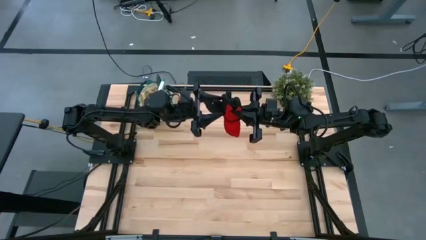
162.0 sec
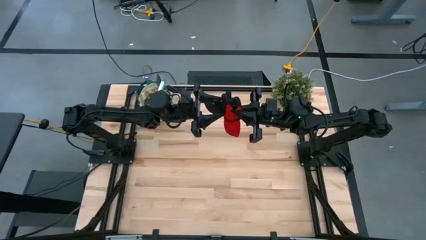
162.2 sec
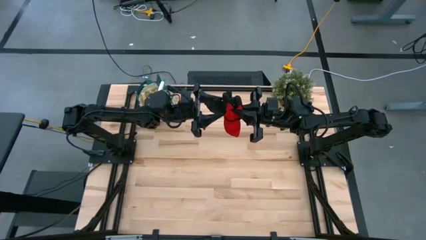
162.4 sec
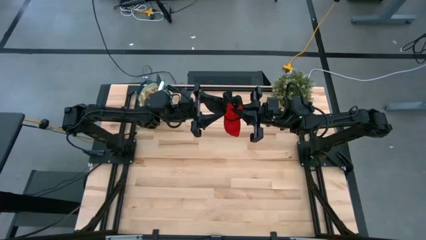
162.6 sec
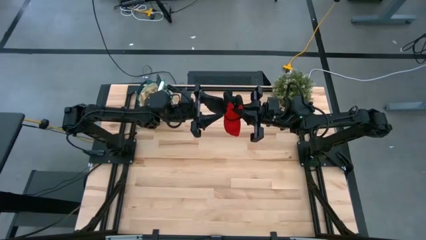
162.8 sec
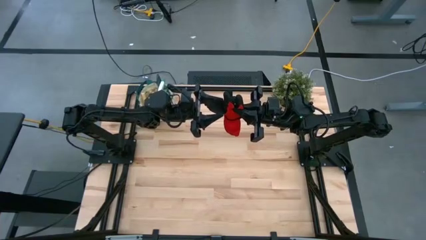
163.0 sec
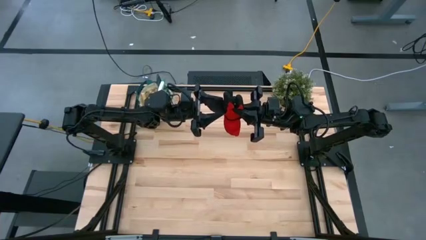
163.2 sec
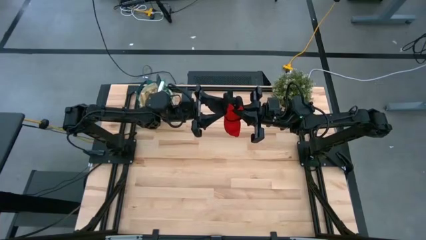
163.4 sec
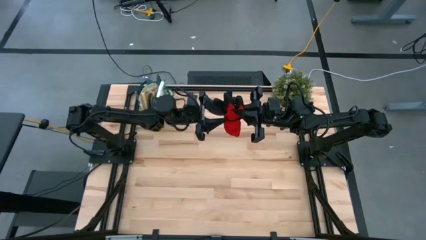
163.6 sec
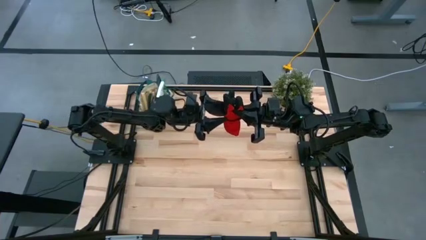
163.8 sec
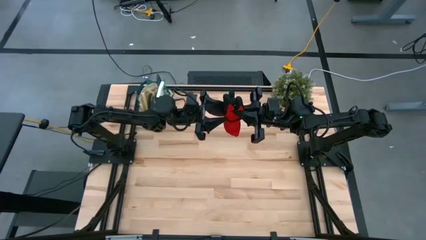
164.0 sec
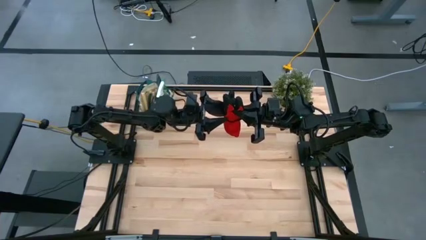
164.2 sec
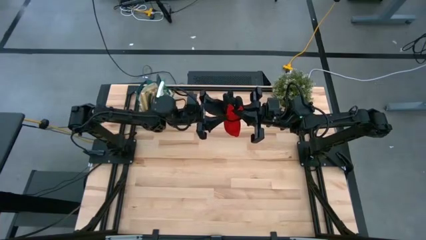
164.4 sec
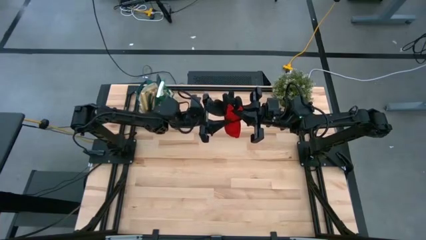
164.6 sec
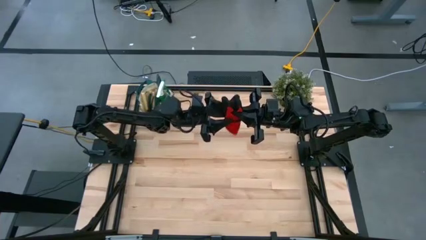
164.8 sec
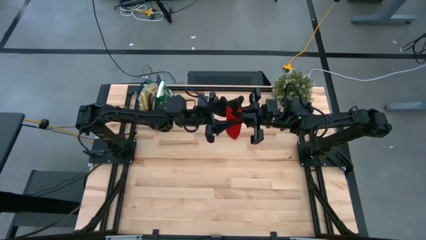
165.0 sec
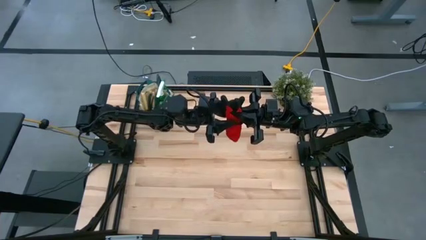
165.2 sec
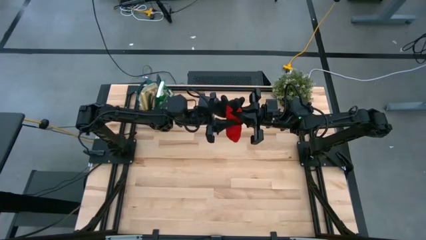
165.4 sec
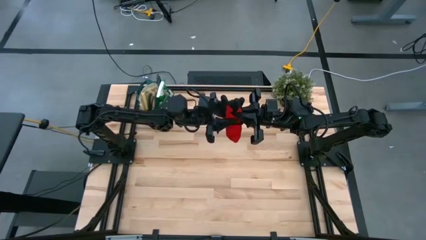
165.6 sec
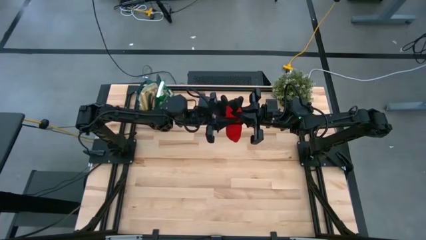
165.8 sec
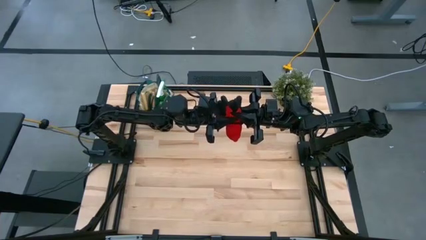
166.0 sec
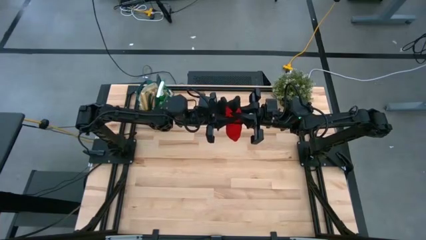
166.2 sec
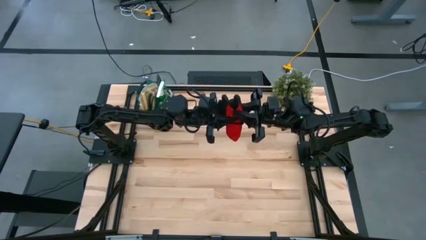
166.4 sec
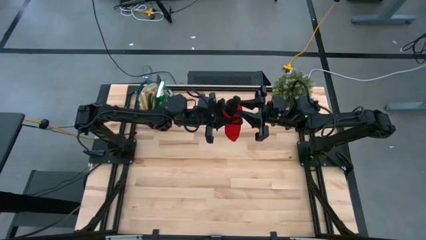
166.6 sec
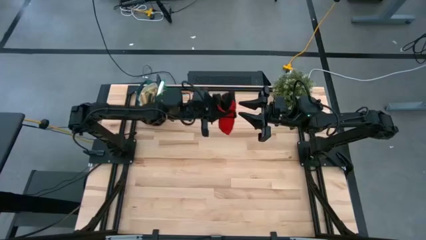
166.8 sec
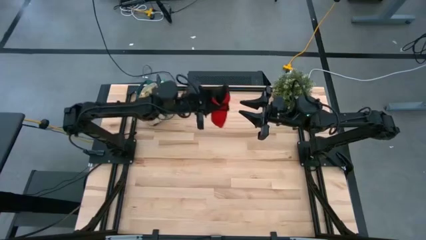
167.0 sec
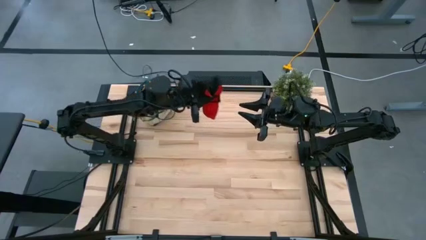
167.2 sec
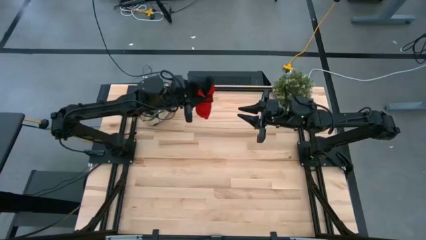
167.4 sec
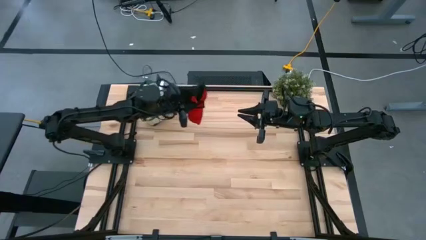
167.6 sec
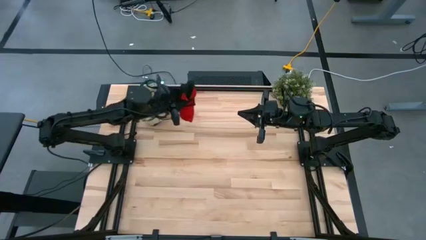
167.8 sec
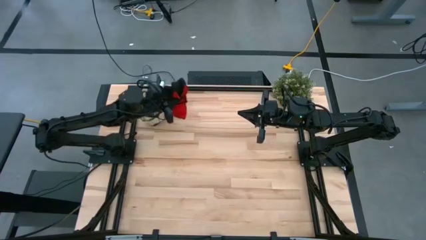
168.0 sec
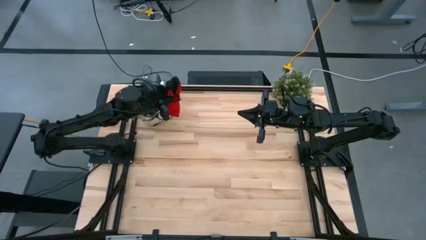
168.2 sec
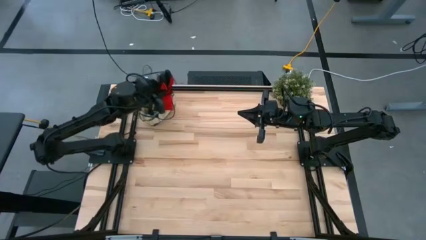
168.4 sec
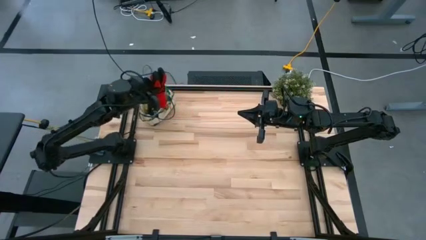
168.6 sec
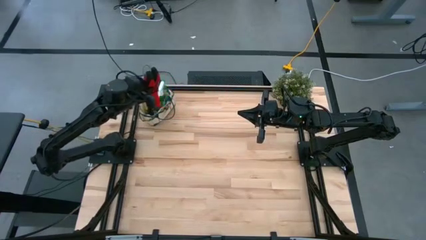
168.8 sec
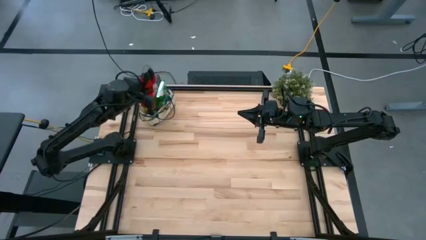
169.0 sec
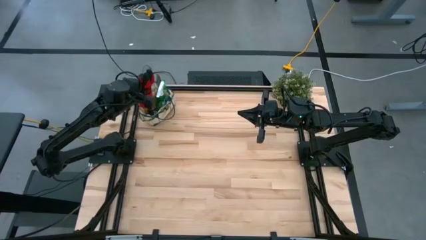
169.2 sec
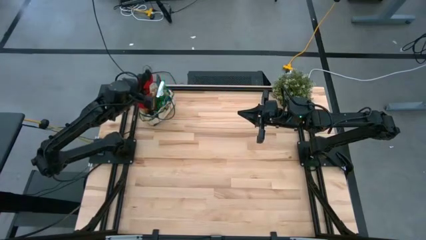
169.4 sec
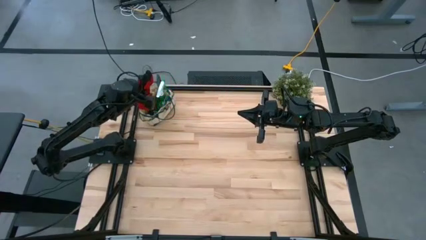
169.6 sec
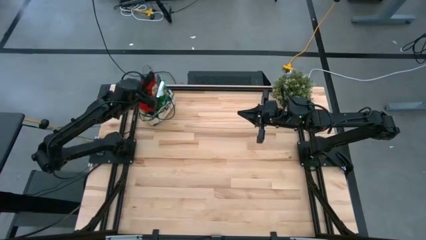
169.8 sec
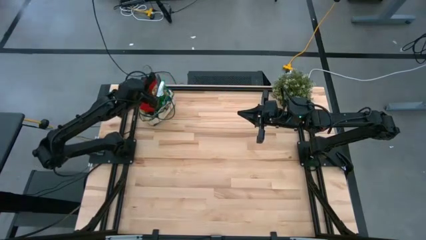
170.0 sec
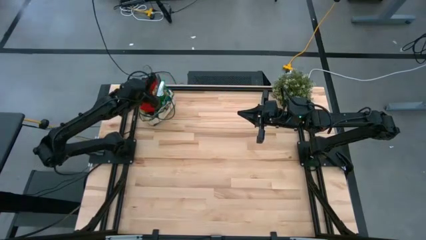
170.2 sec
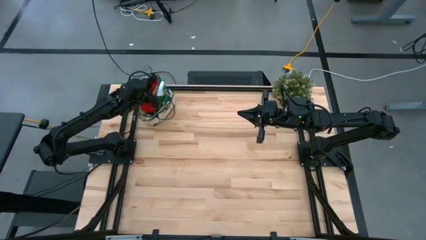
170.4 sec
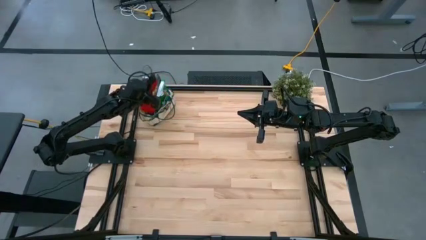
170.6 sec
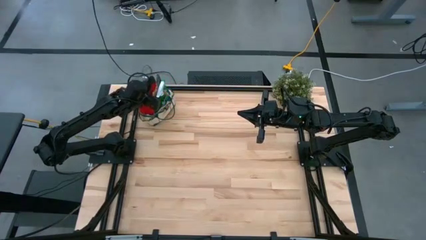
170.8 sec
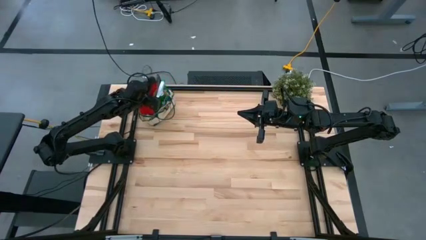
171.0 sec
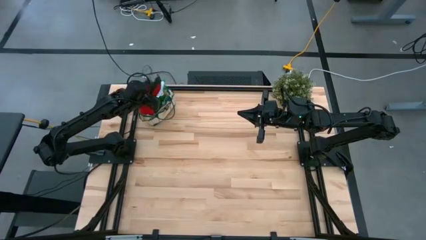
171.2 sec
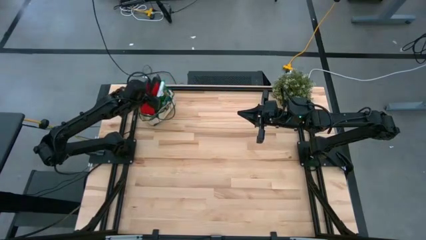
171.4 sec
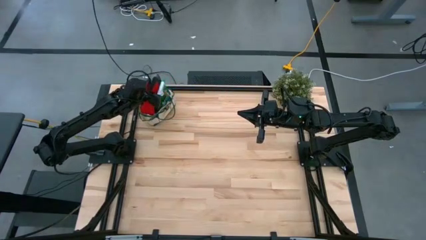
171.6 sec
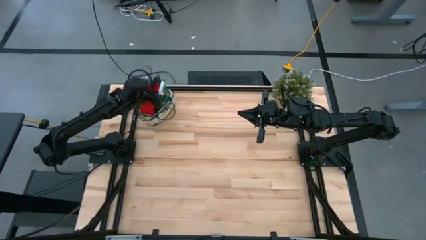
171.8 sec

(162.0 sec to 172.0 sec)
Task: Pick & Place Garden tools in Gardening bag
Put the red glove into the gardening bag

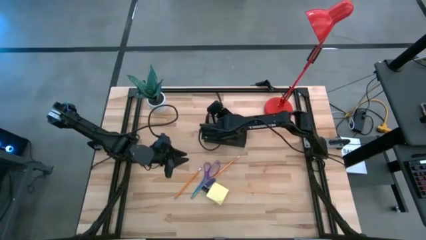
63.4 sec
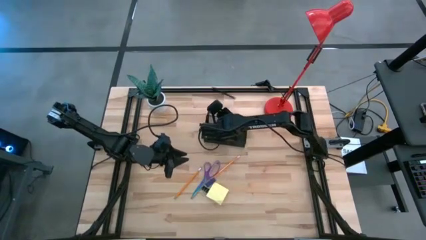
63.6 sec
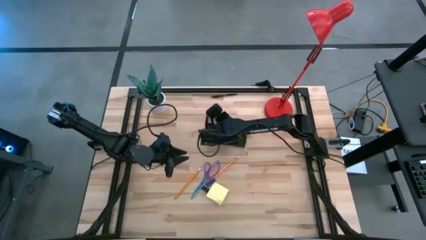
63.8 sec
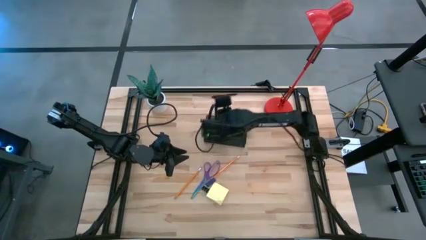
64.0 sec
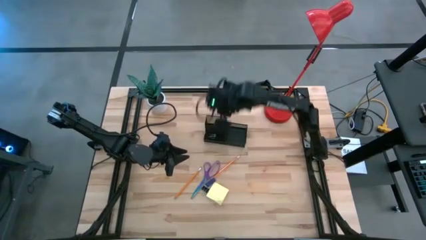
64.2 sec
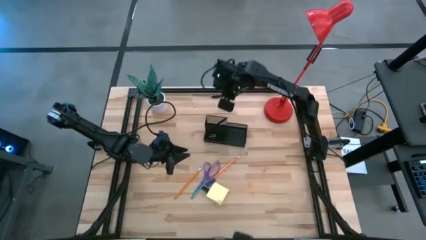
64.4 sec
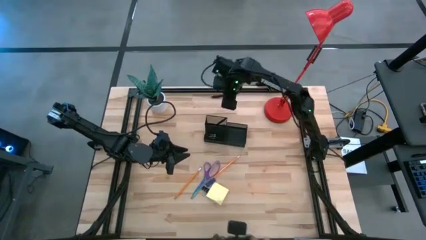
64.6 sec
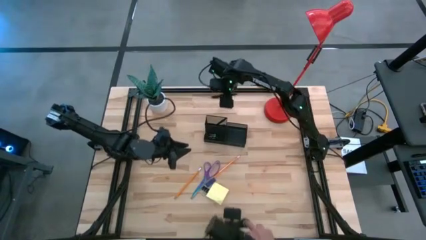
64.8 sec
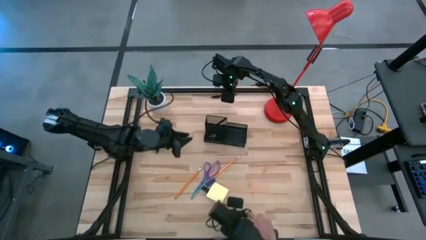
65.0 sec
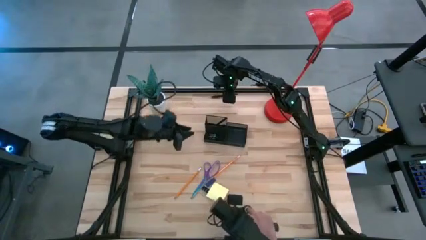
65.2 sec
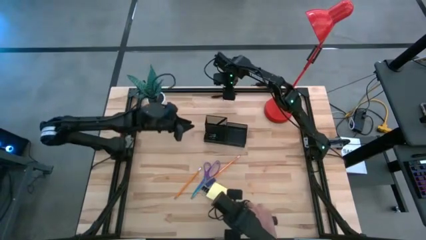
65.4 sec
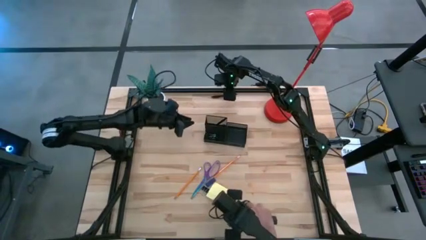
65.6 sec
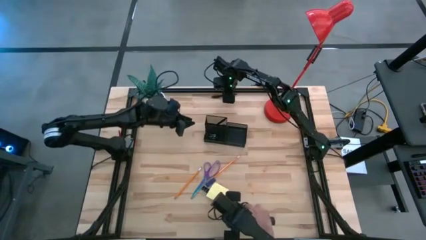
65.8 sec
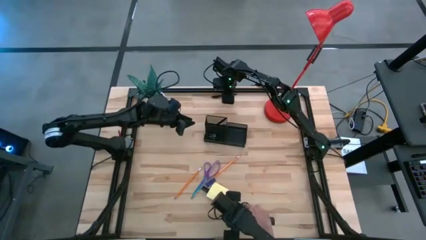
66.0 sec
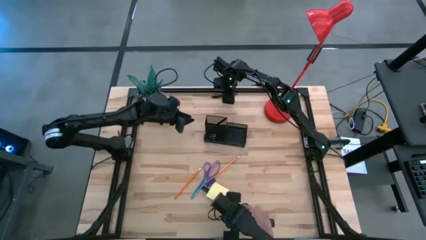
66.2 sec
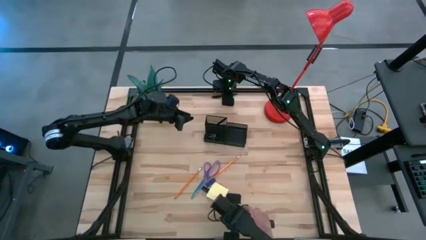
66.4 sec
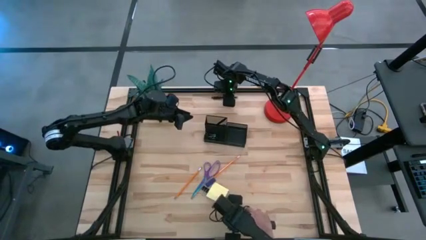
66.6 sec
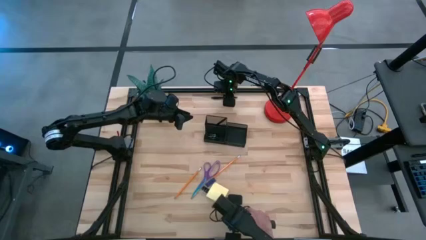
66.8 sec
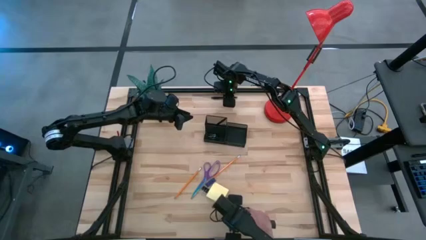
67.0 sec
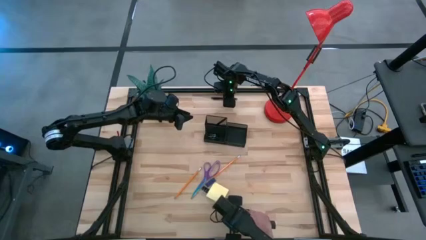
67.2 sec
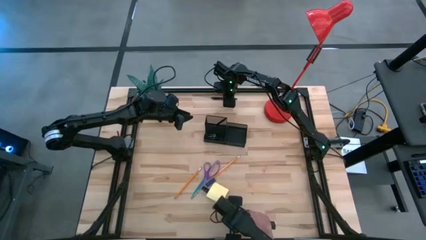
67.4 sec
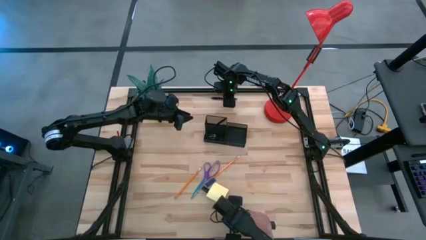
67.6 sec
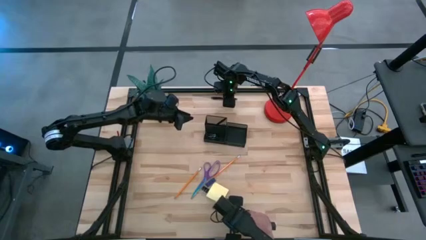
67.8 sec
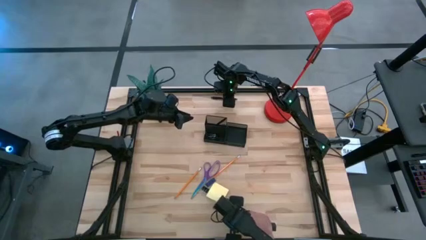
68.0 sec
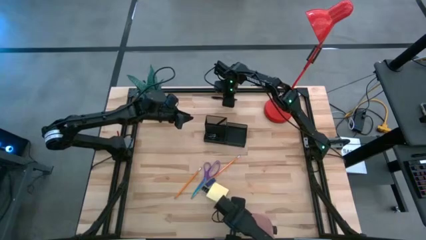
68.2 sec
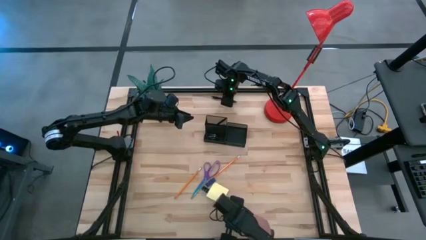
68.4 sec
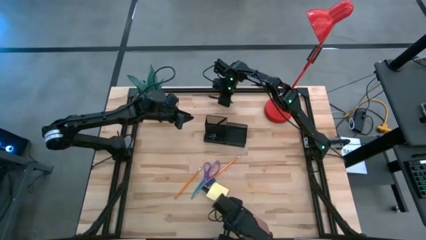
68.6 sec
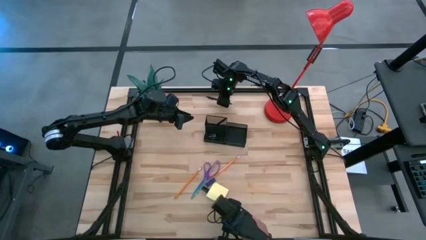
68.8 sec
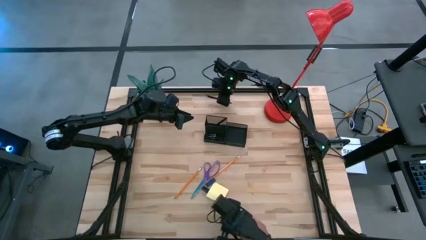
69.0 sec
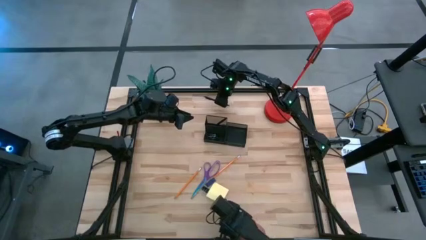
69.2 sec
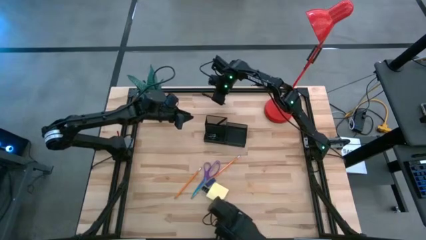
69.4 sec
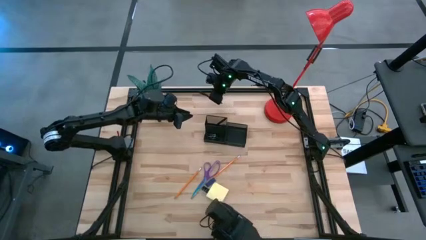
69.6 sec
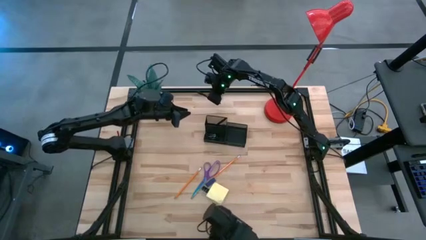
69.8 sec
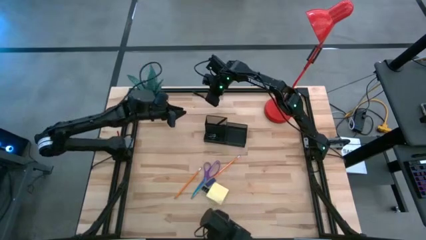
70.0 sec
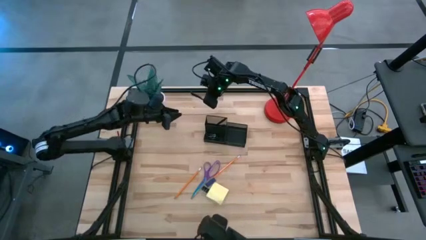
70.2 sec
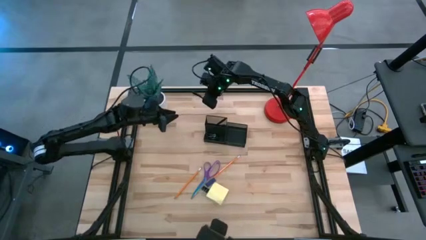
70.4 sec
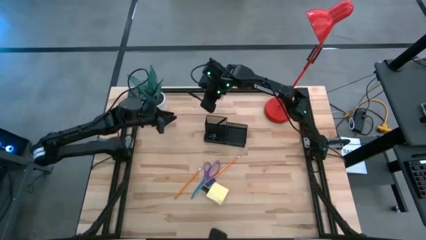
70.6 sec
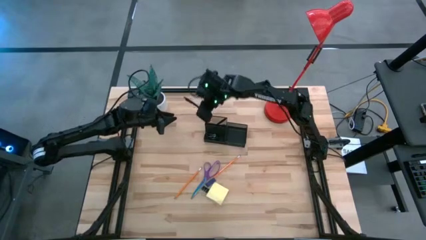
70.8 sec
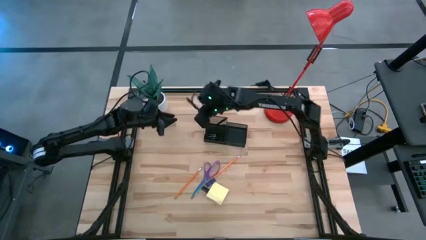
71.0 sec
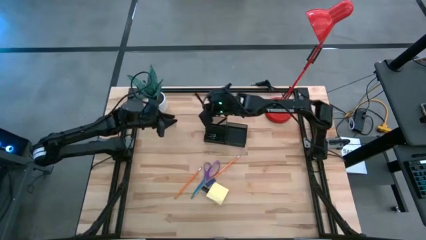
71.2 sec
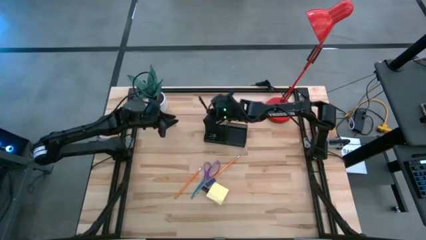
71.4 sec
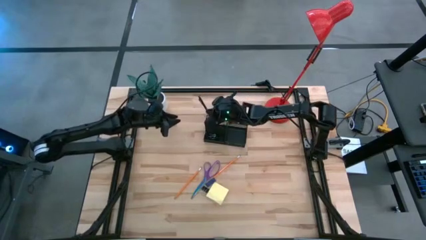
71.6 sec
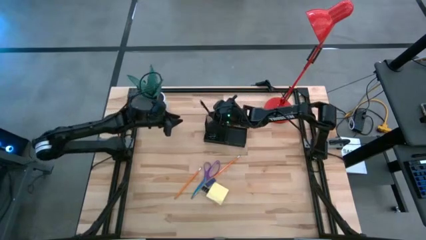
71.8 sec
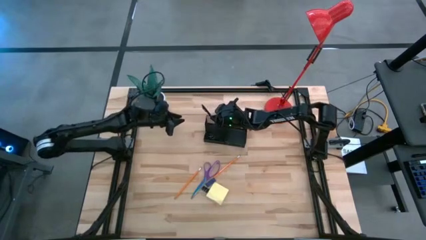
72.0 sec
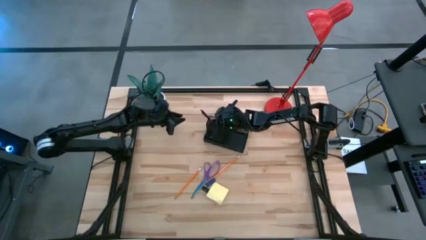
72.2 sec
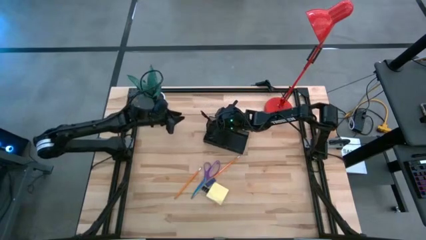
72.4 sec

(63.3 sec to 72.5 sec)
Task: Pick and place office supplies into organizer
Put the black pen into the black desk organizer
